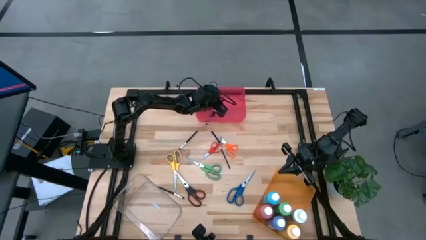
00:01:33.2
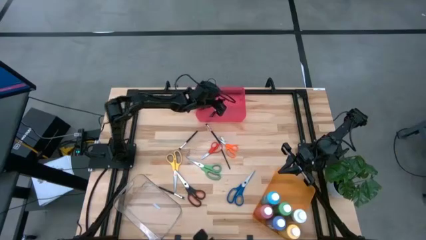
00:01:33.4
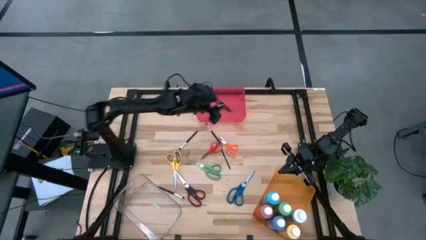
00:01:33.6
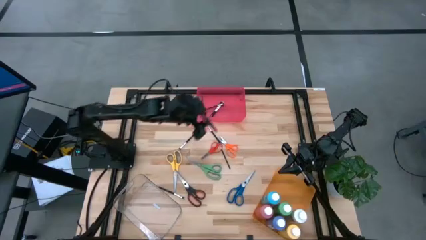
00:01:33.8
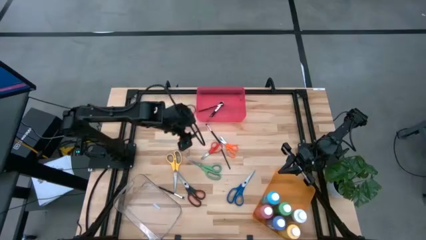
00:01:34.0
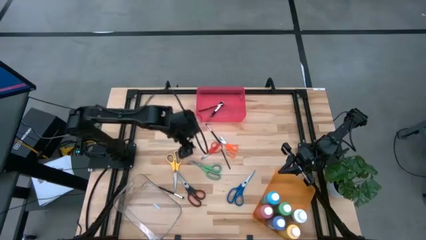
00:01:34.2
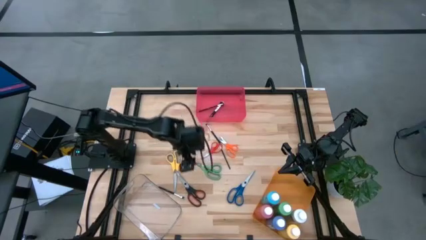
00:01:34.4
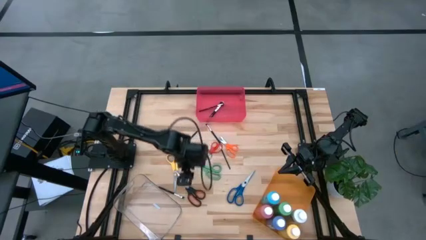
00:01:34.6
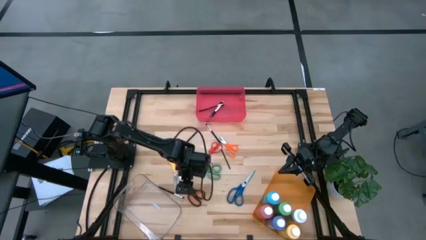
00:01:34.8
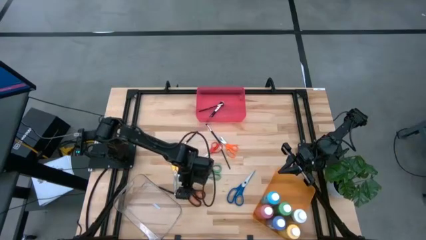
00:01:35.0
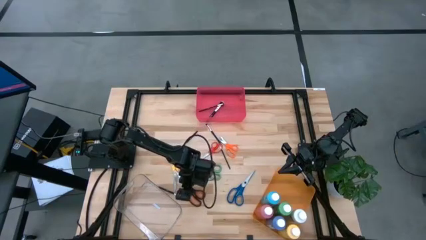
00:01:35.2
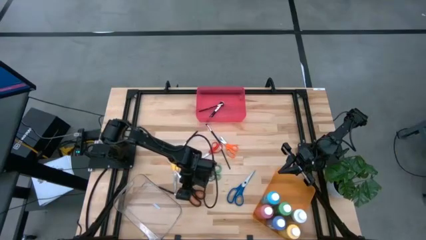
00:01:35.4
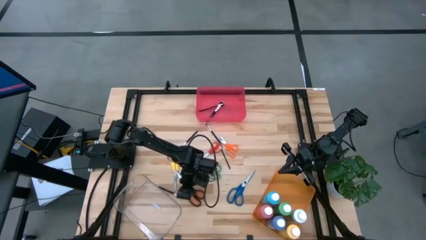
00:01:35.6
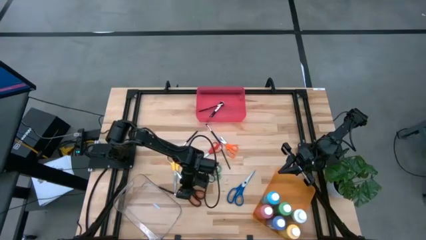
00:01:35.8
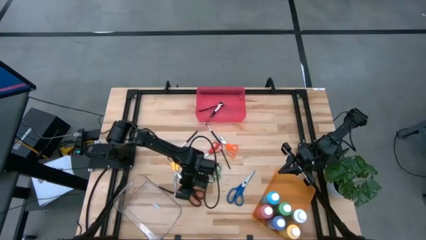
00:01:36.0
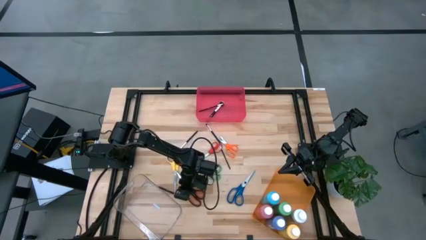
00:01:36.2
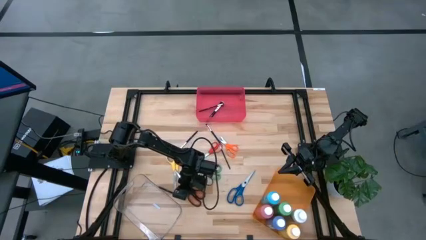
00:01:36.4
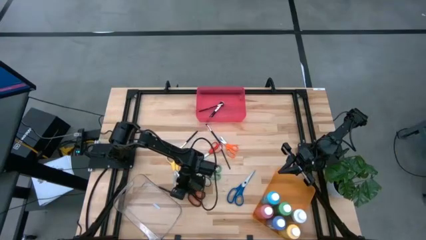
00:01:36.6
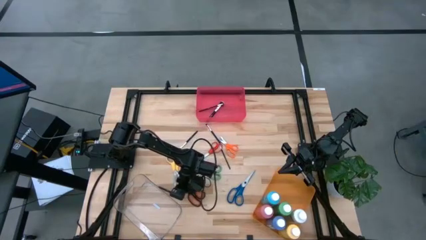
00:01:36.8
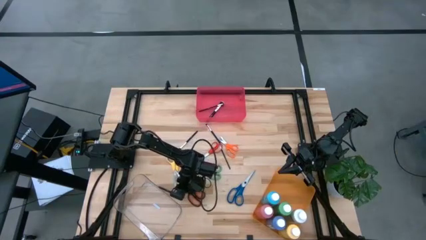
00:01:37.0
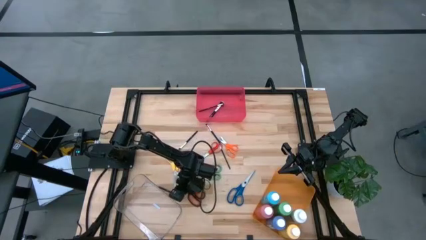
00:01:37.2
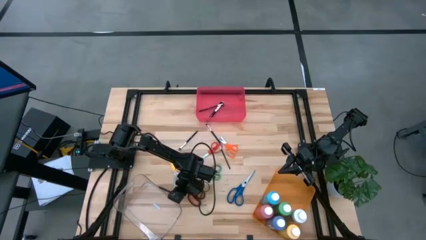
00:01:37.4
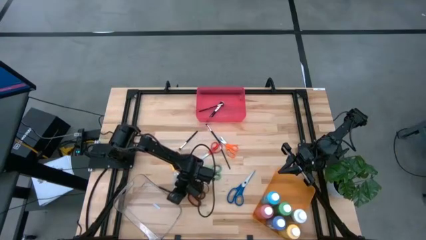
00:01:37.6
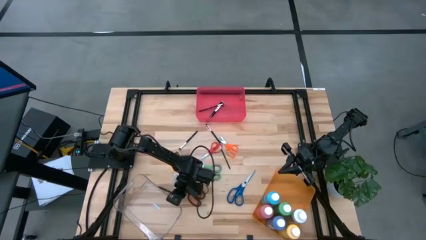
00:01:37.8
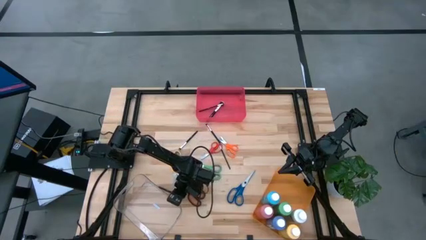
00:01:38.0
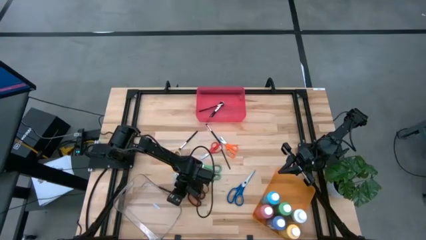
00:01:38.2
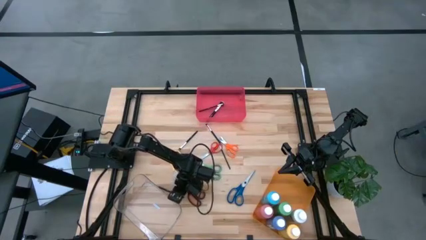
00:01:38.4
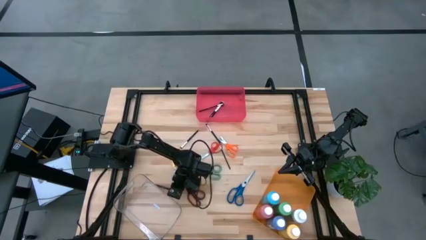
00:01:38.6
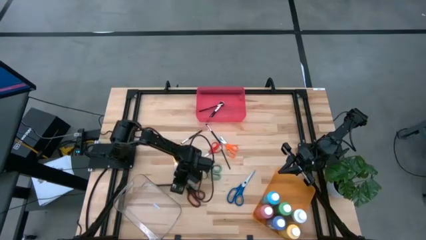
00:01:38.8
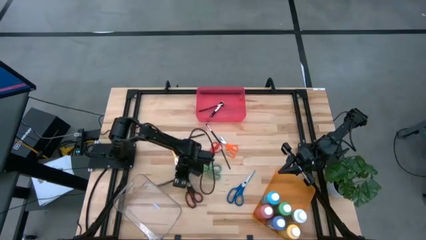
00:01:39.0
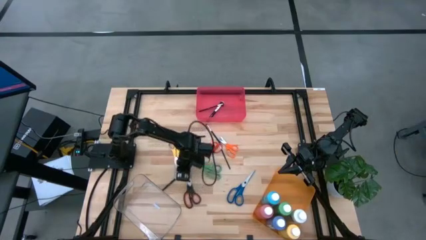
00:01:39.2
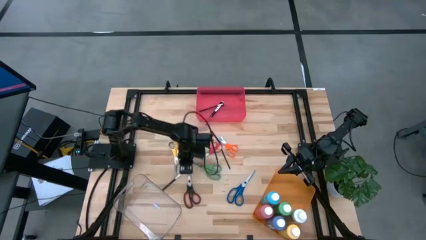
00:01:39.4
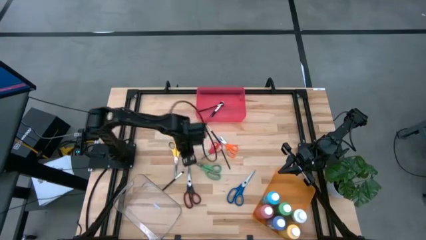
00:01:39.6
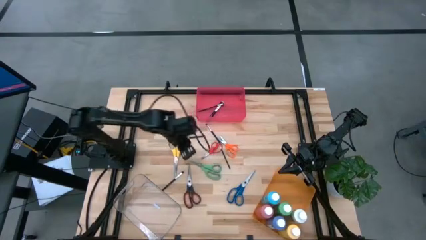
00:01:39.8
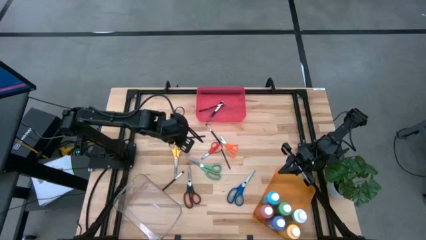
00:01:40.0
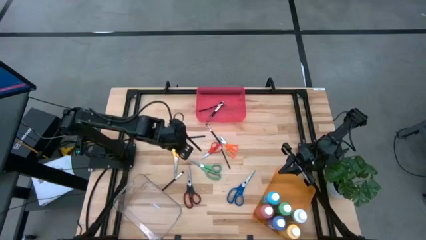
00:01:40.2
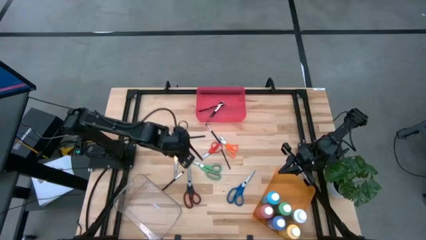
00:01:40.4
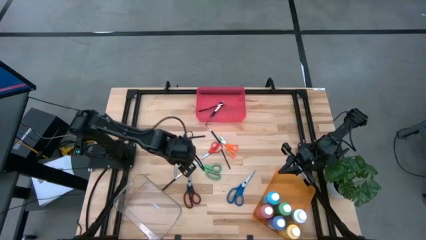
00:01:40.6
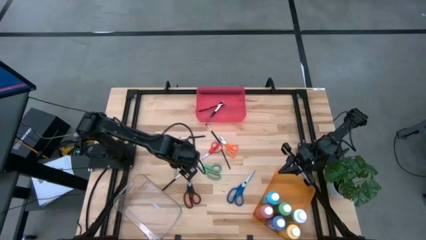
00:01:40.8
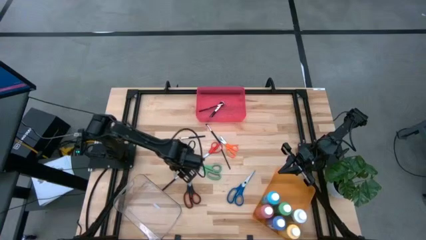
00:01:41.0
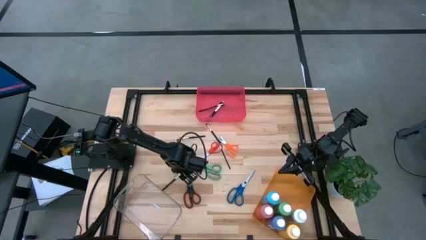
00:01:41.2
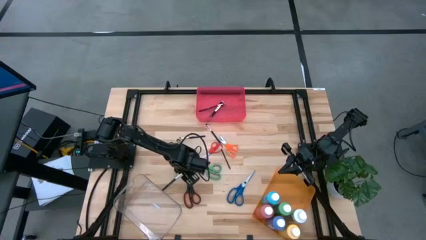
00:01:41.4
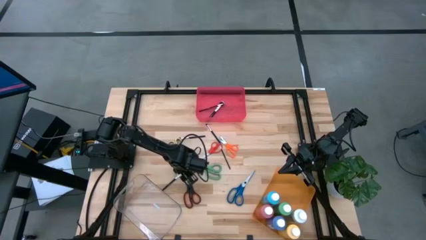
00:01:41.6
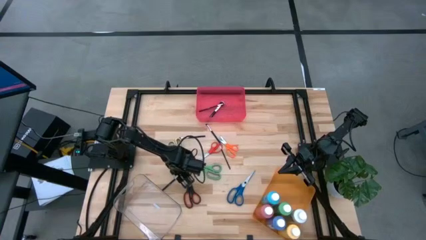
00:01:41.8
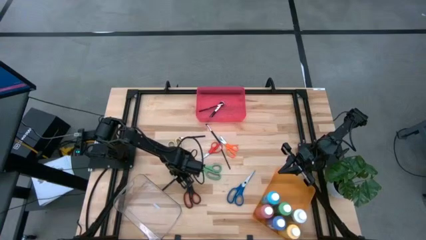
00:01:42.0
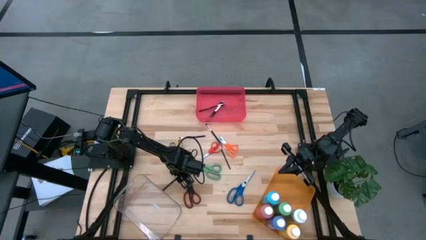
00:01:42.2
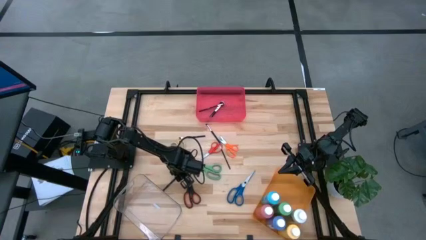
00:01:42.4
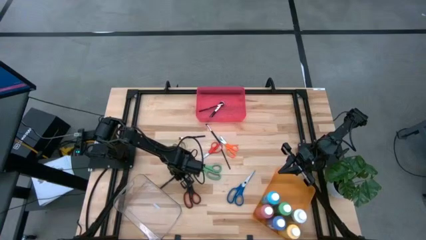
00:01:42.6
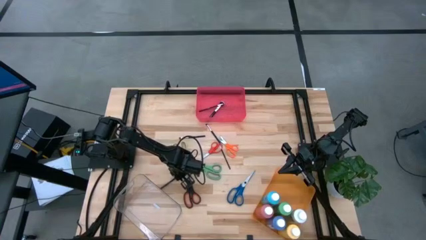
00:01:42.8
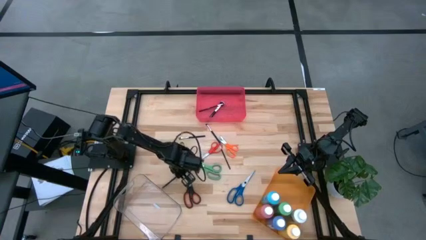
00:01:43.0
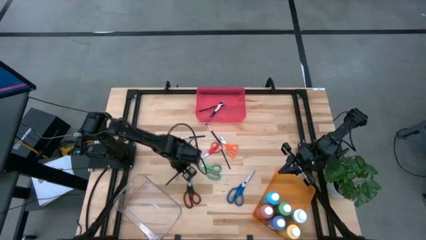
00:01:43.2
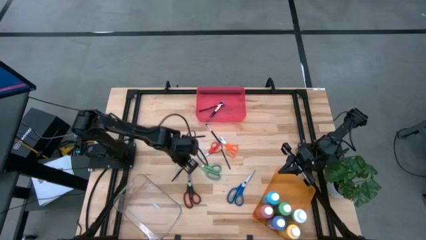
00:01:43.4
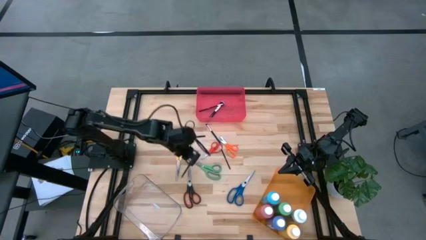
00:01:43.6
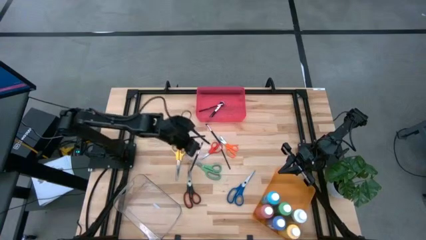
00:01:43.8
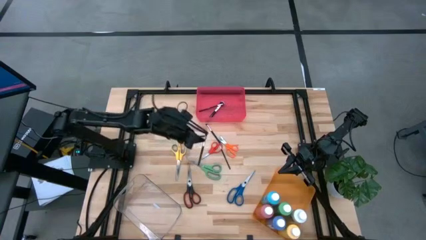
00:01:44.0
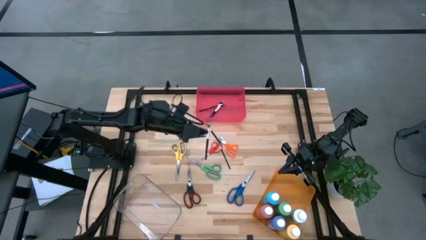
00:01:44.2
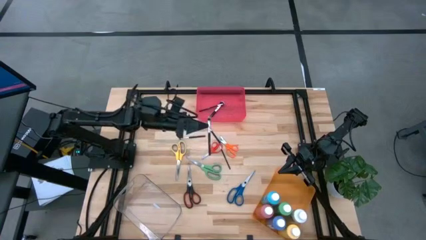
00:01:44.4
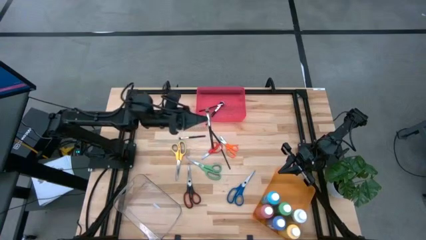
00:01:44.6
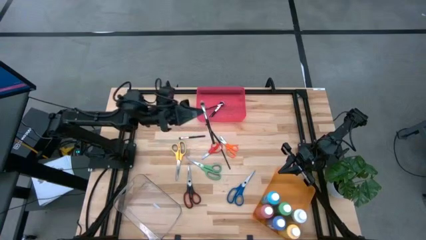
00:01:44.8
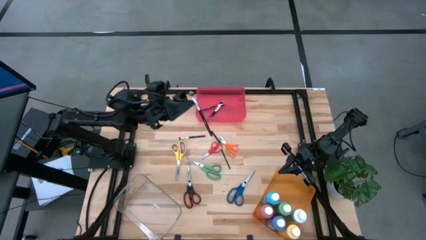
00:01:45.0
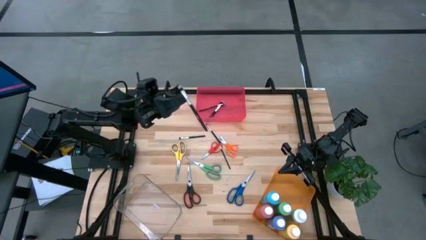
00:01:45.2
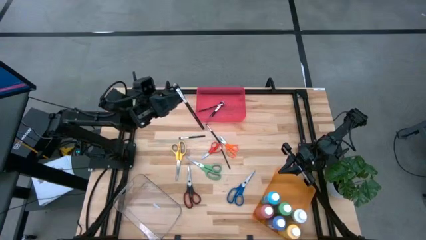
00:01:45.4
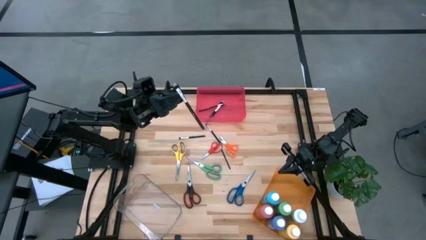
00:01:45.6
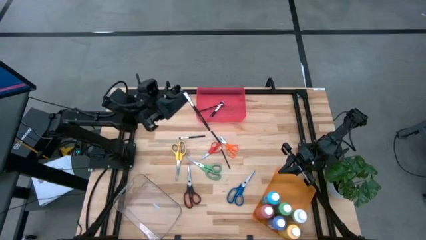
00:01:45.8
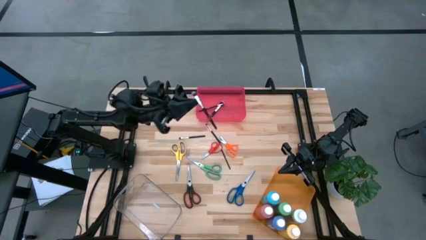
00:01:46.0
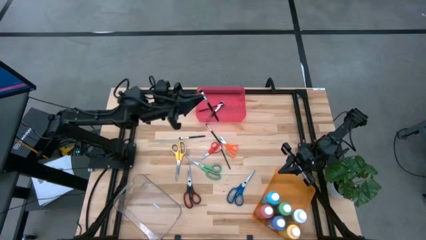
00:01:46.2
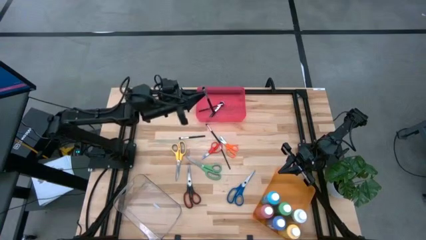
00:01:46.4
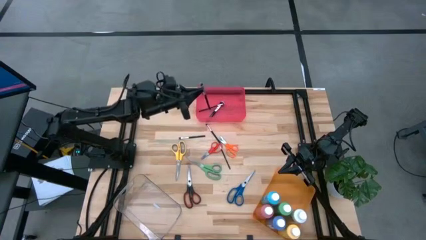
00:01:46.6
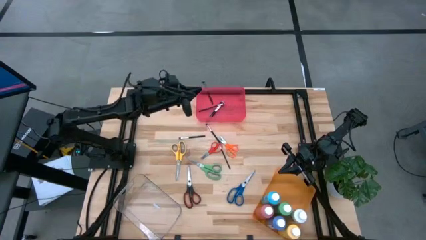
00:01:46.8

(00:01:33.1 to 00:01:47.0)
Task: Pick & Place Paint Supplies
Put the silver brush into the red bin

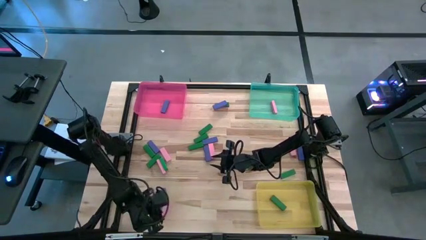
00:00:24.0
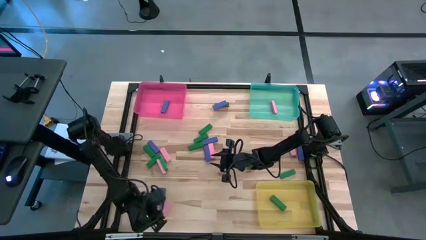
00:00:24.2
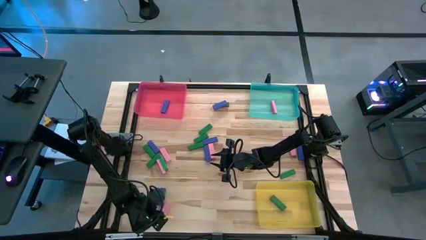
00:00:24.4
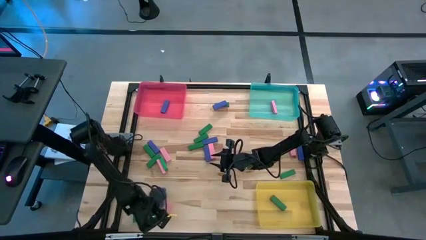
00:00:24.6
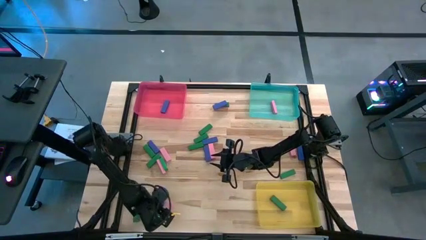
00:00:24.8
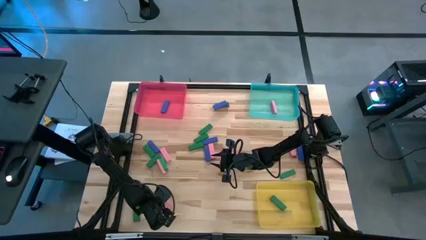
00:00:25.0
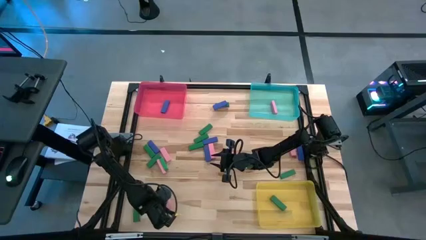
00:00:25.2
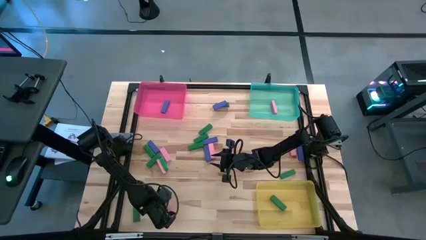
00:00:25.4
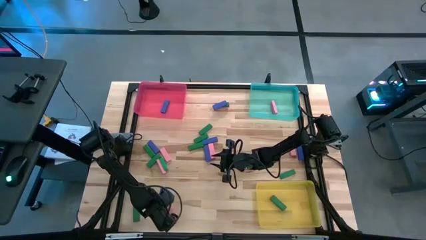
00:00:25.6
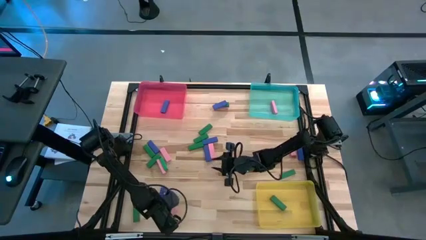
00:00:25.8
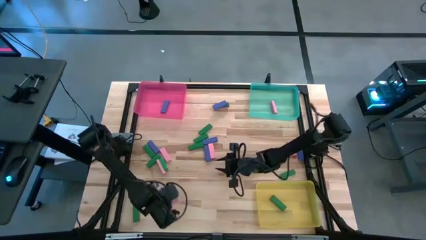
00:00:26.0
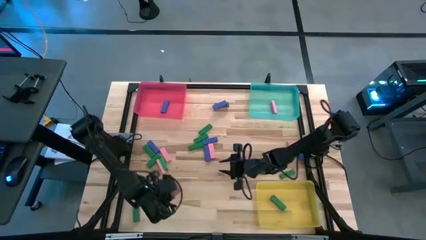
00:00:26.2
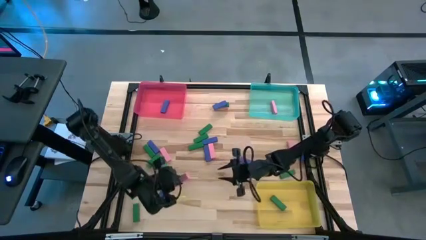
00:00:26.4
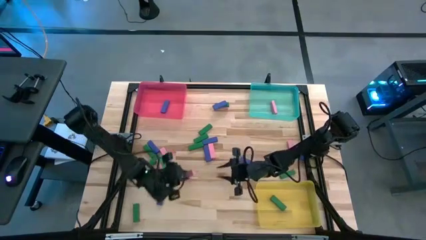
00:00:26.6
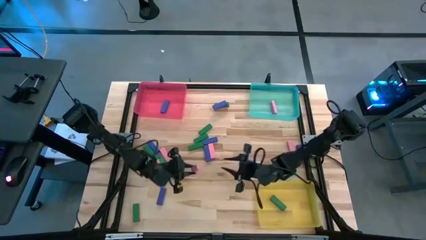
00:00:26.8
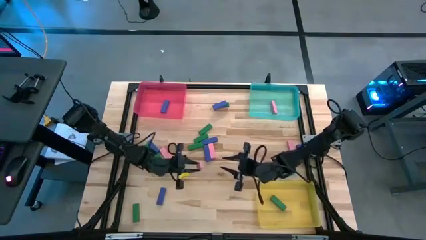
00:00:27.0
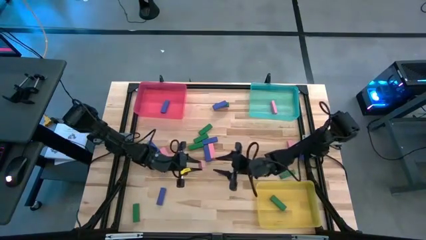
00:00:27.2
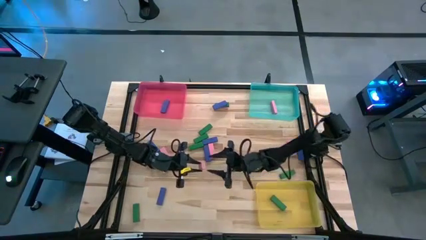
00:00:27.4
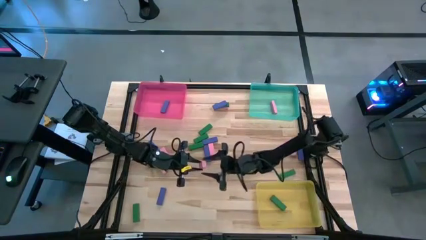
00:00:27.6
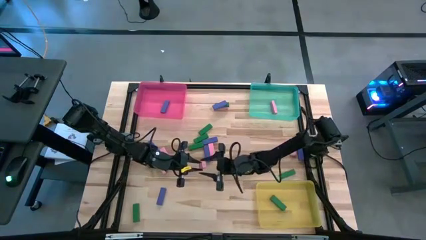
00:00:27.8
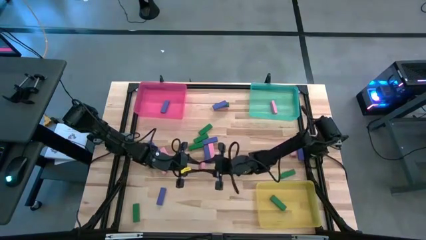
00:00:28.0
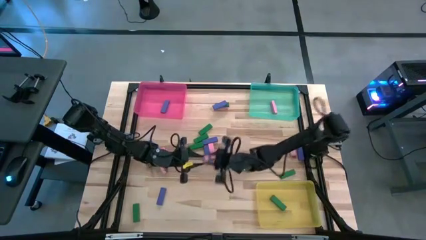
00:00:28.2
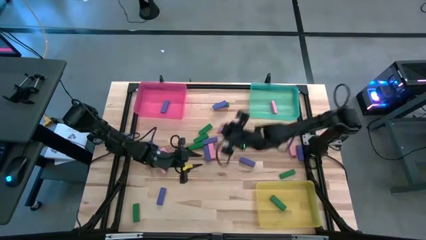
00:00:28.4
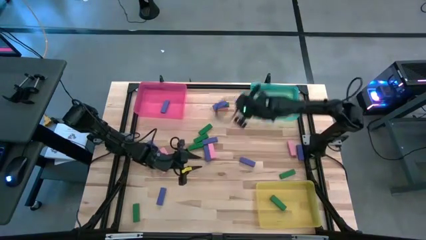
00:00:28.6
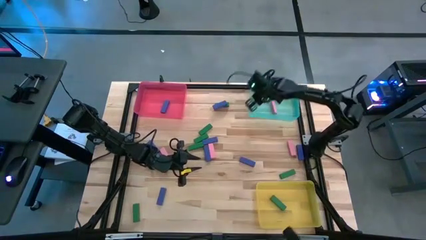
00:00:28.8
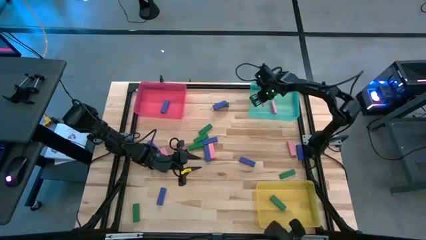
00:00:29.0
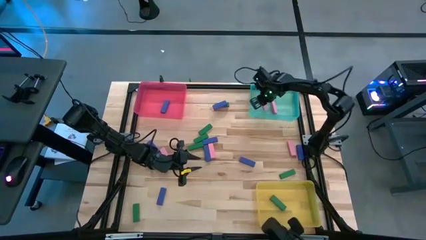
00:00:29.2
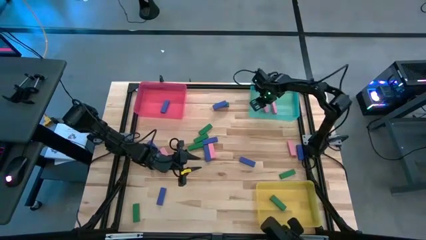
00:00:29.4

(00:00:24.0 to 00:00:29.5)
Task: Sort blocks
Put the pink block into the blue bin
